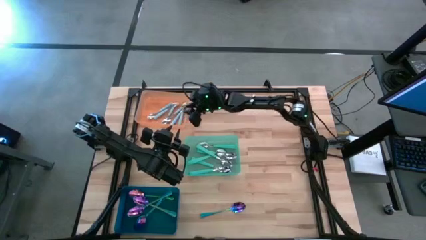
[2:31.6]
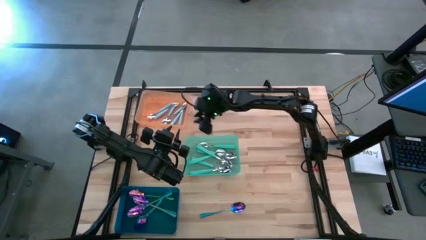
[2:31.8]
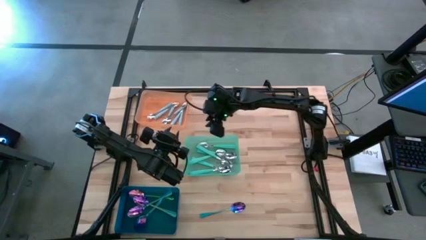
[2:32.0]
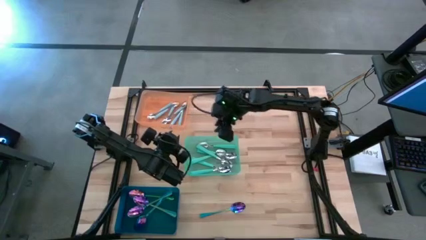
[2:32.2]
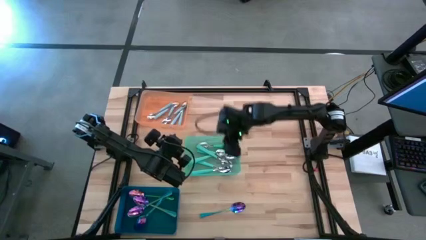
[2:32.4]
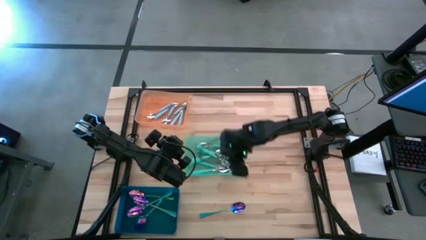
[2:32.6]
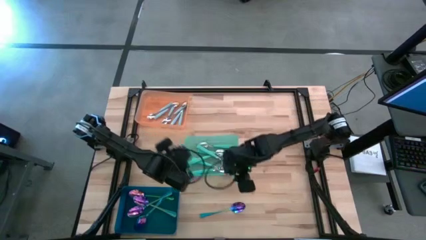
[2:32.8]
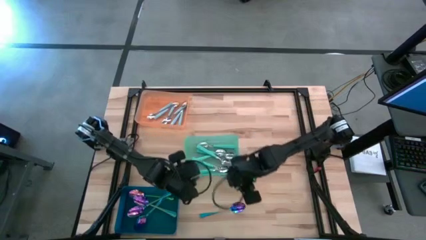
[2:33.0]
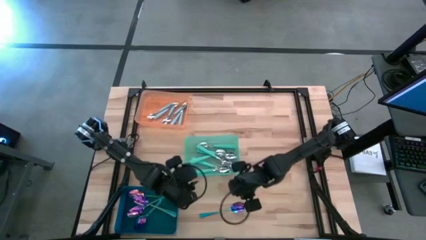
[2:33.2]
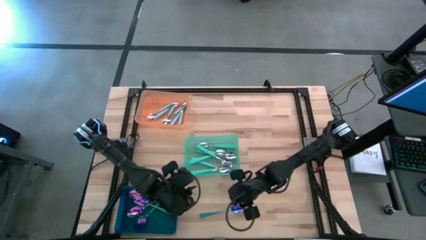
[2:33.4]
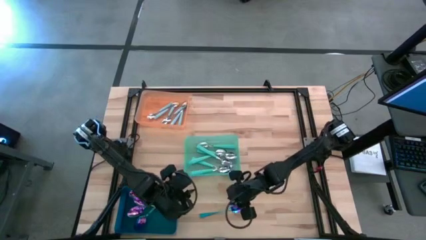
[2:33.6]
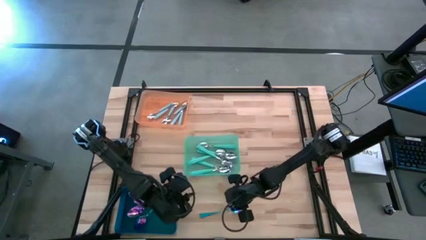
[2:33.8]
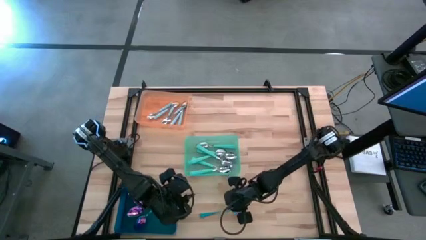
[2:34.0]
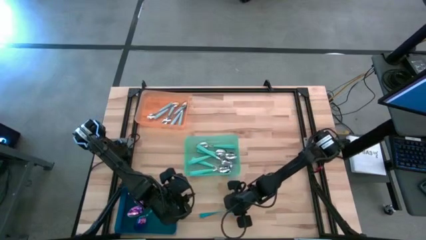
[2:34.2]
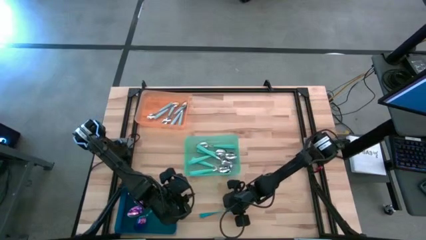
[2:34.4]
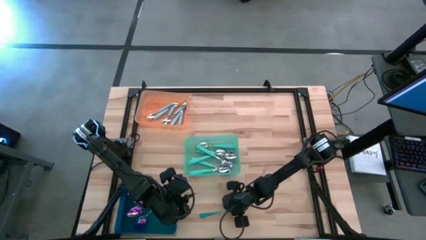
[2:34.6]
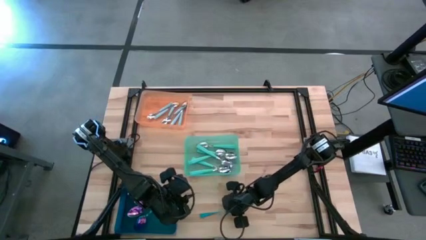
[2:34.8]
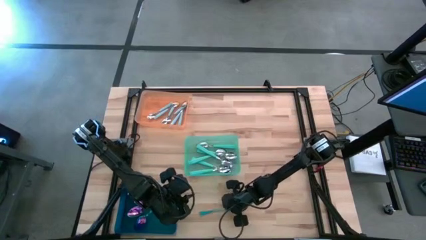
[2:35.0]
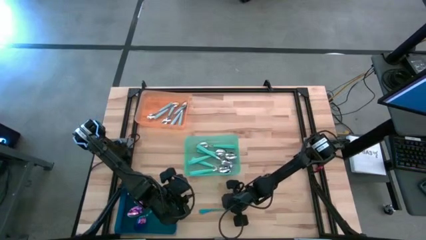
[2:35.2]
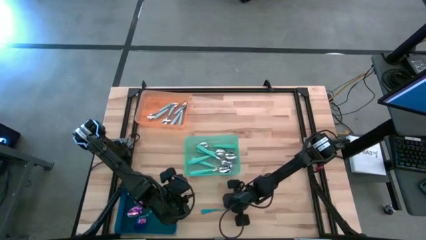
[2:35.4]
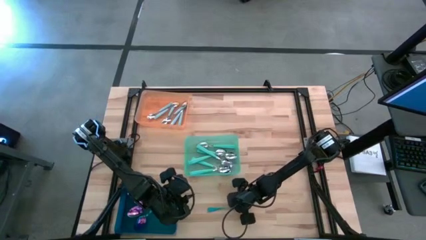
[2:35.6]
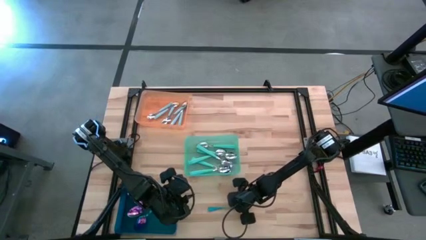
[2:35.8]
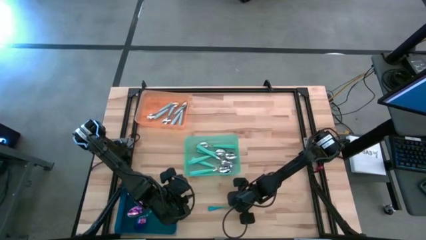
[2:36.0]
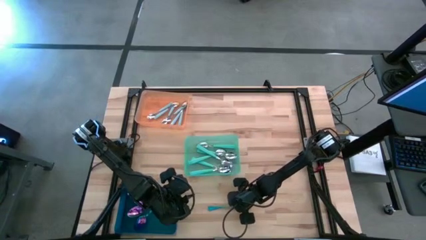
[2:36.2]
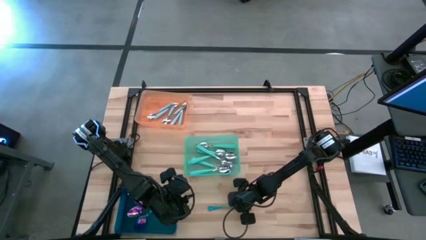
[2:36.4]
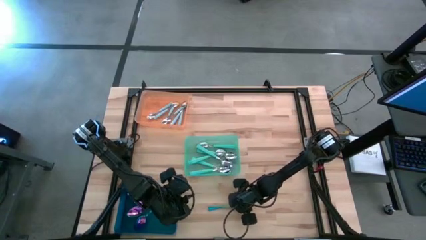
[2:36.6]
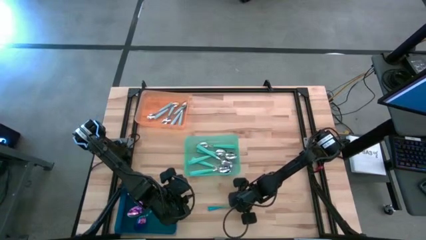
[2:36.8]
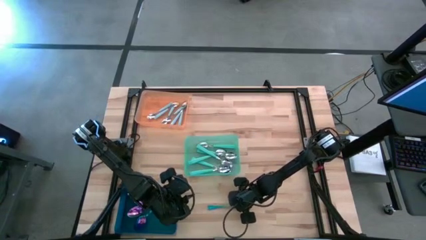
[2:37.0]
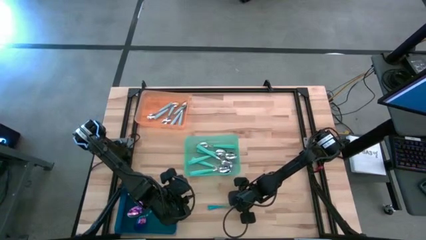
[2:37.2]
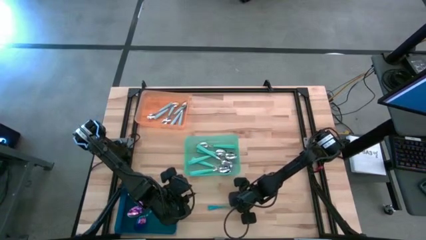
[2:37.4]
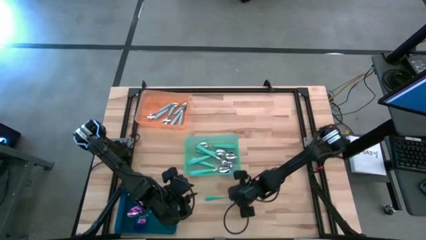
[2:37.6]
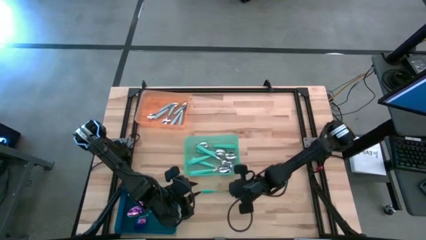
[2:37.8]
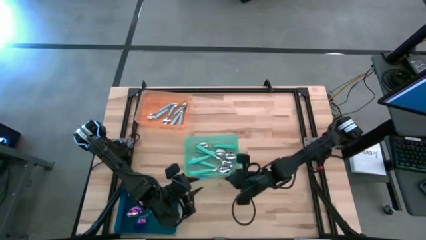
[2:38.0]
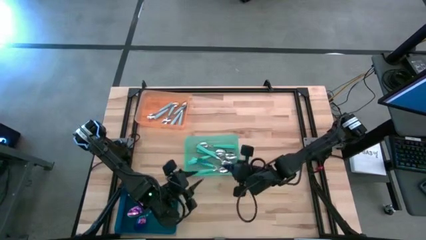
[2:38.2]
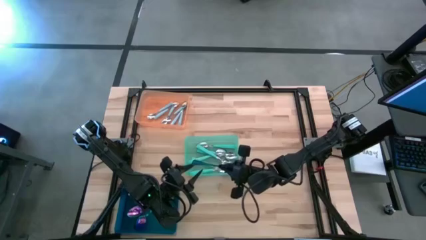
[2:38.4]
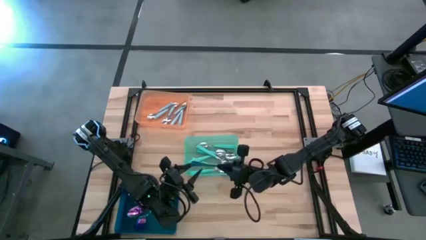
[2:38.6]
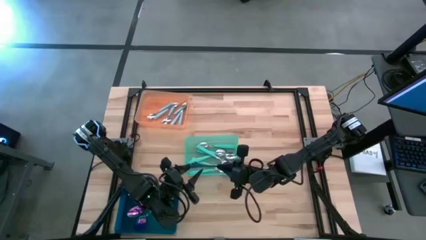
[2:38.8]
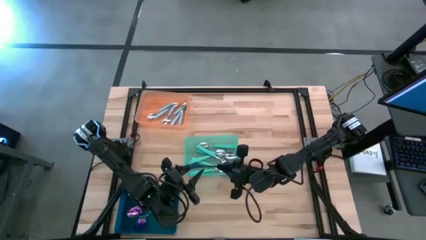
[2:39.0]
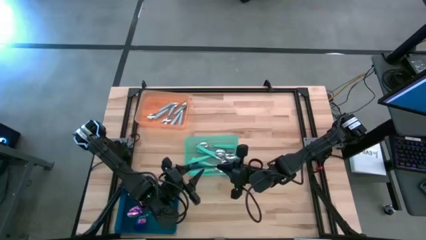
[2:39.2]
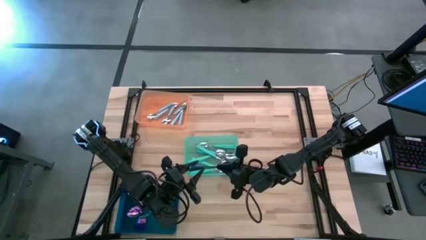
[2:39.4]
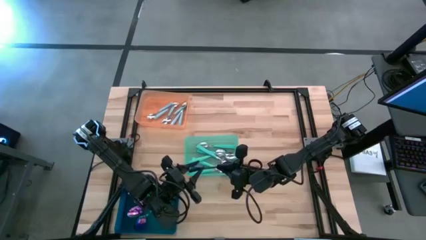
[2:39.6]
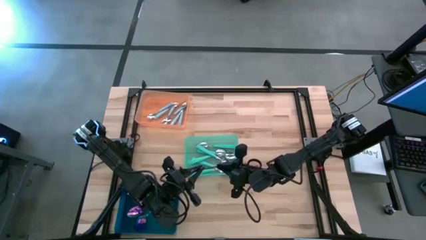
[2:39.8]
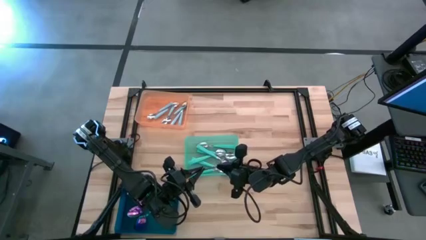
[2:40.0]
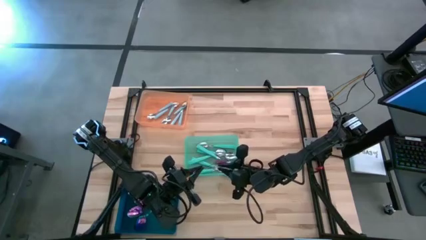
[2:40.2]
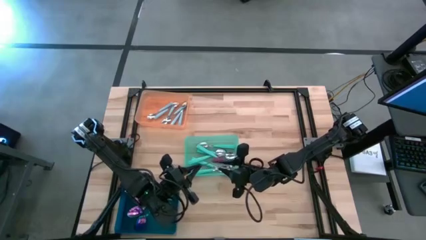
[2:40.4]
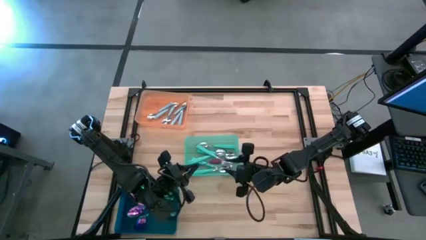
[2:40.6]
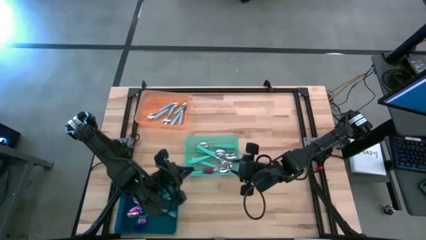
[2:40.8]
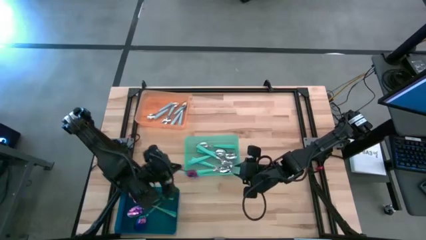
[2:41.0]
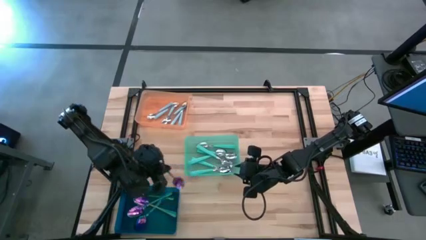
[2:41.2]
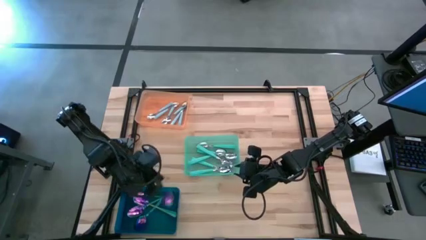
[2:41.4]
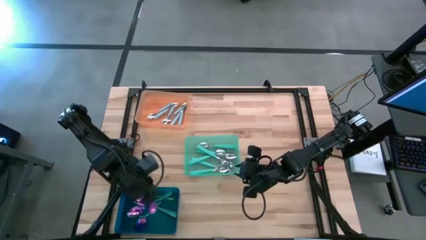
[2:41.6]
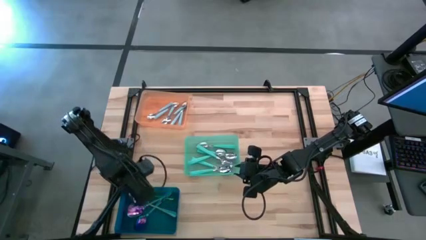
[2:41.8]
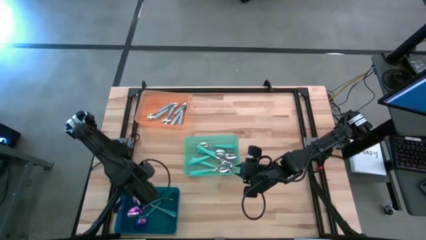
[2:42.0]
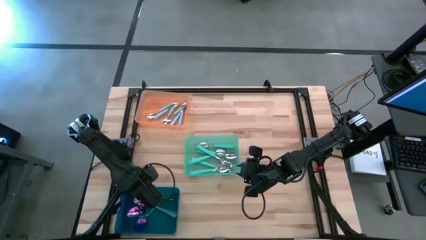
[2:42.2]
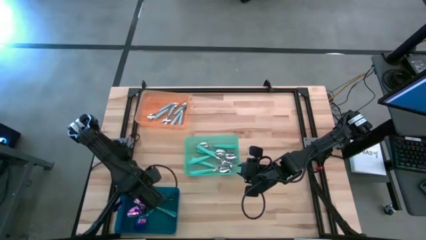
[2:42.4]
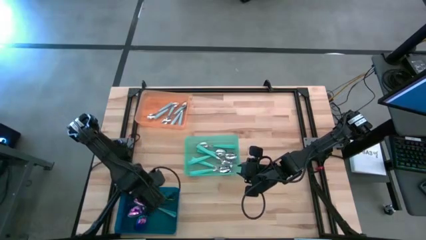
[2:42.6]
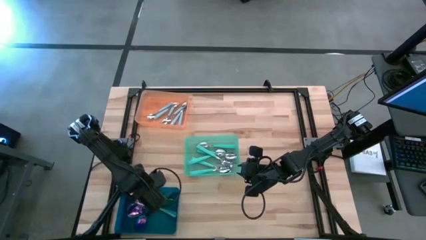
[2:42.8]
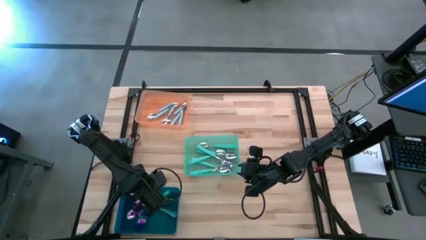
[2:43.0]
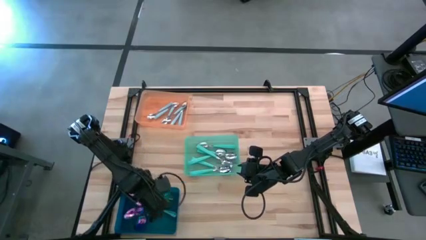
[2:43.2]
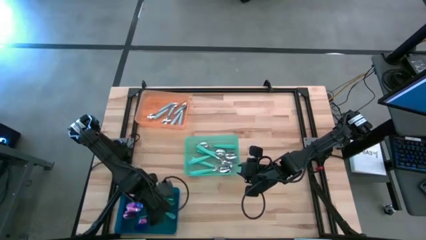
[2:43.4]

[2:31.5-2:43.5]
Task: Sort silverware by color (type)
Put the iridescent spoon into the blue bin

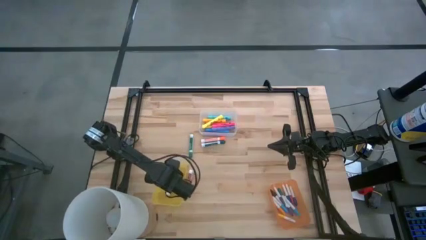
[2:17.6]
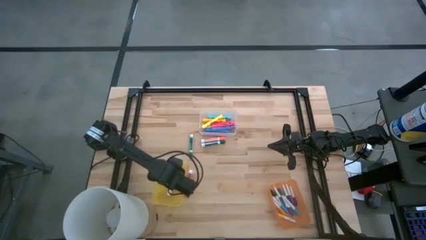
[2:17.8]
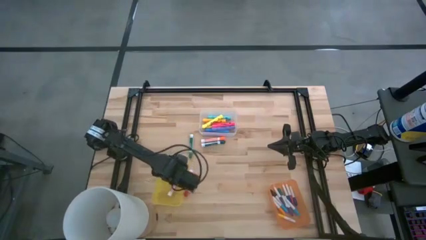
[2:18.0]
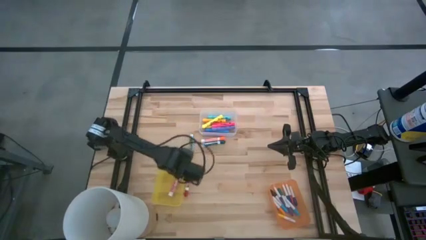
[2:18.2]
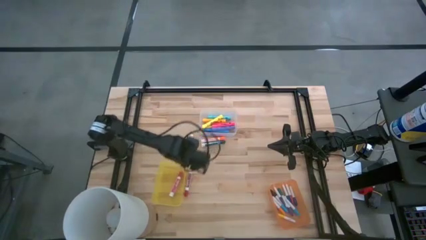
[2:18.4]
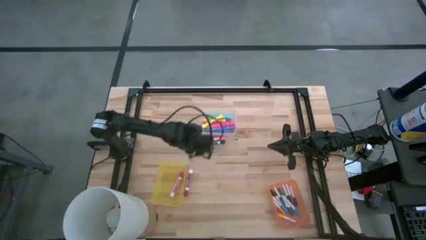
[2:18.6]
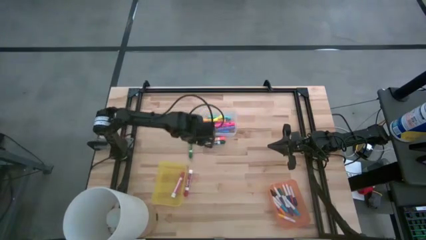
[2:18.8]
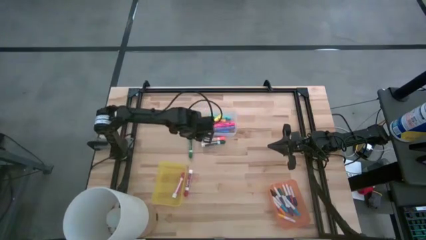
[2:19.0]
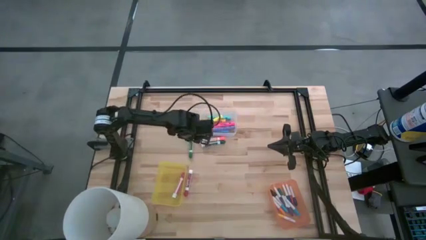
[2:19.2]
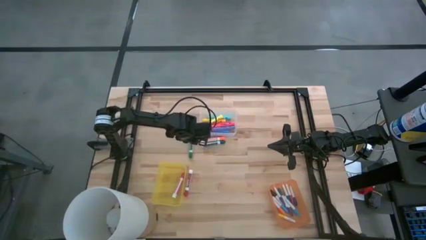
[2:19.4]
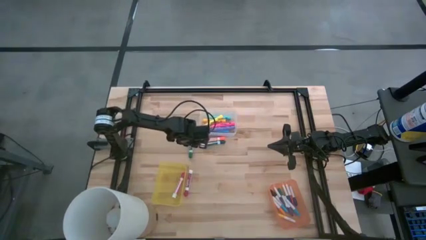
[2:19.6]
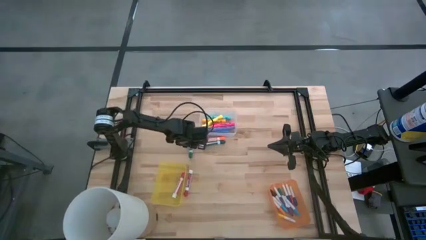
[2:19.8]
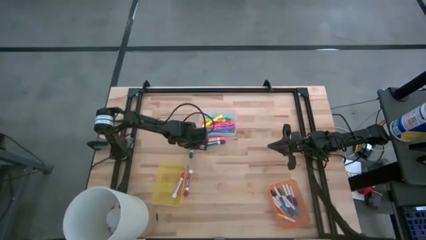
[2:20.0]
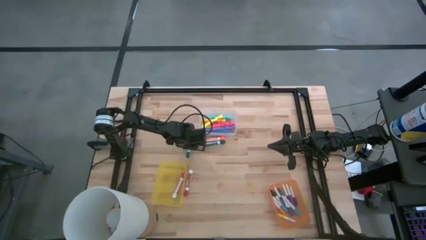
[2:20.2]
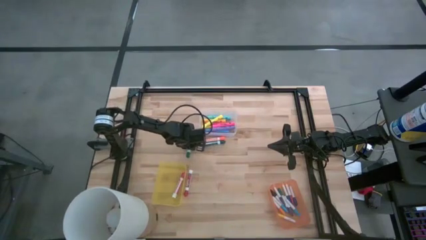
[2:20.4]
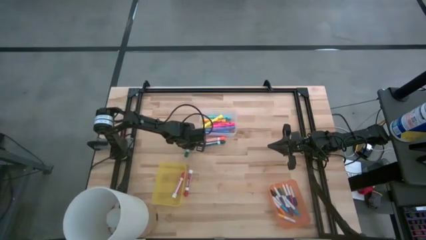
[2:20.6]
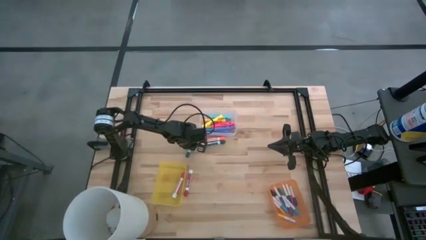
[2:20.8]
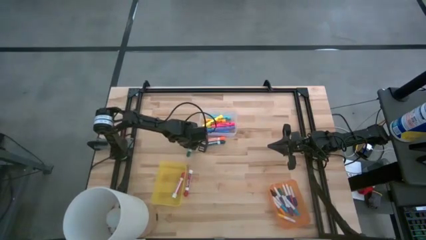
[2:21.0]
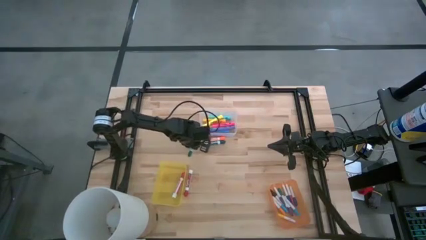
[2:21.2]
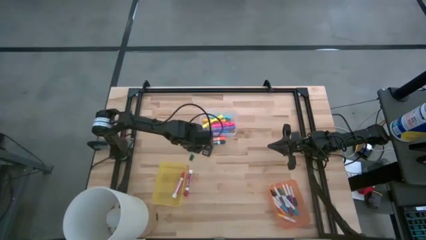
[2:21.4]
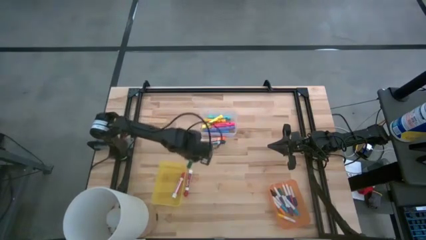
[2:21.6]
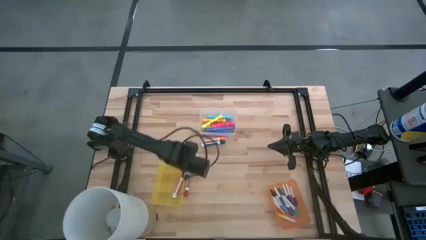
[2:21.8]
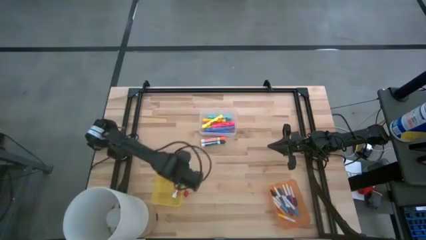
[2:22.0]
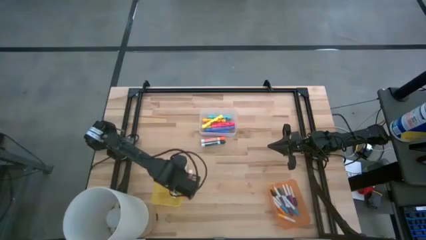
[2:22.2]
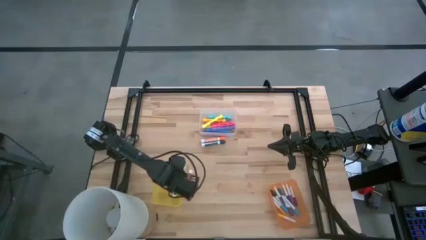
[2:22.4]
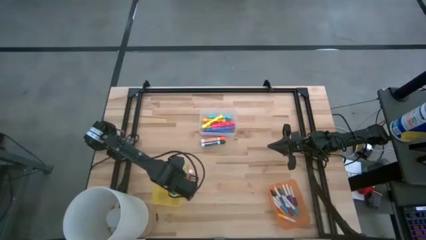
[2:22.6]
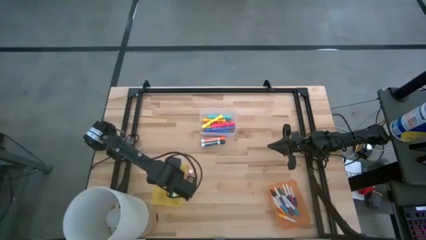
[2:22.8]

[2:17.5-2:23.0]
Task: Pick & Place Markers
Put the green marker pen into the yellow bin
